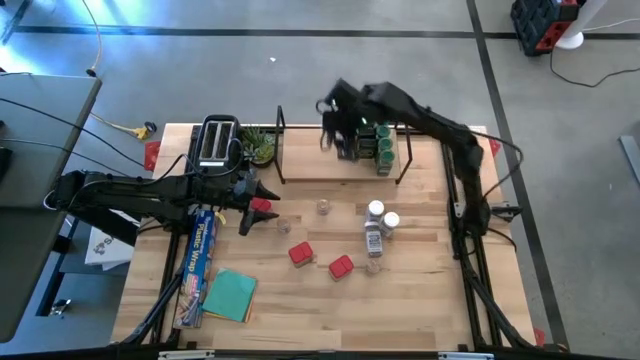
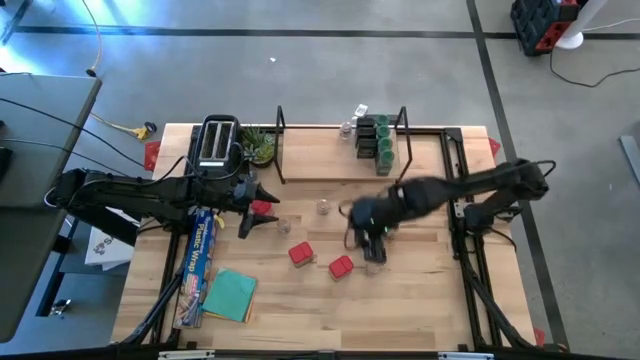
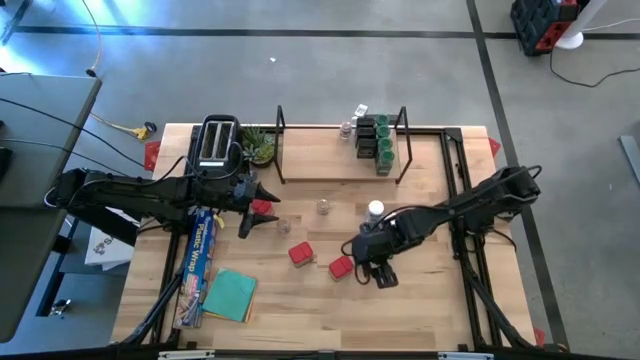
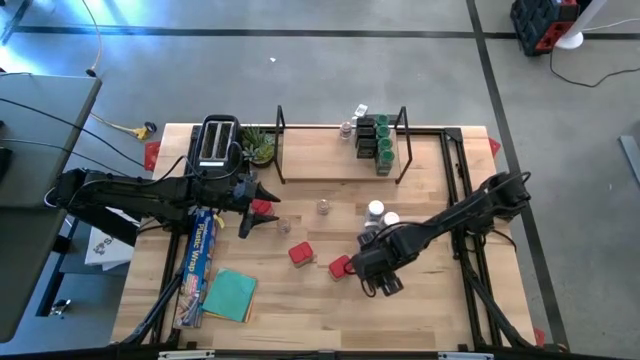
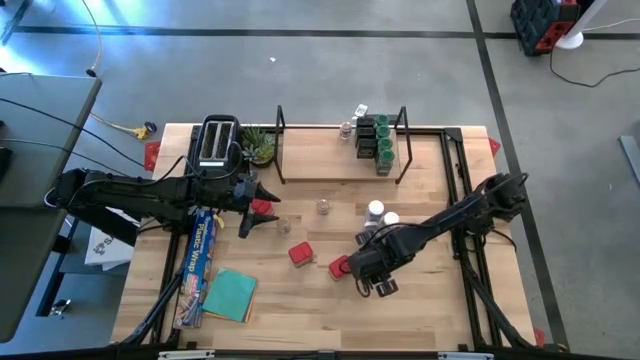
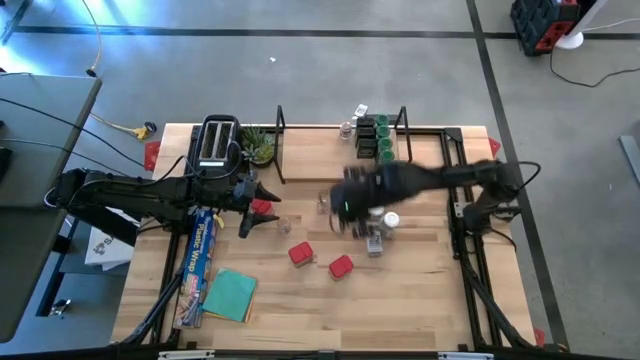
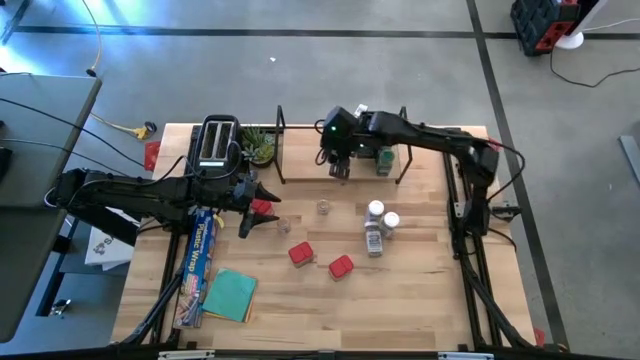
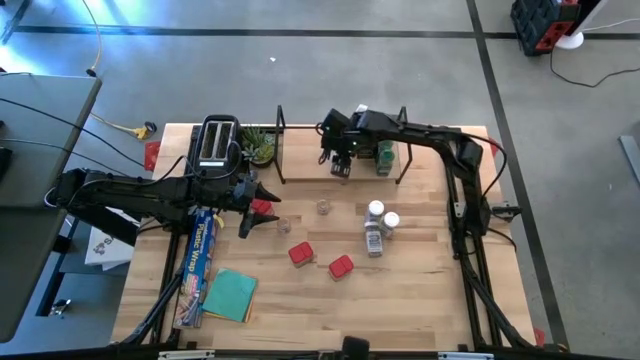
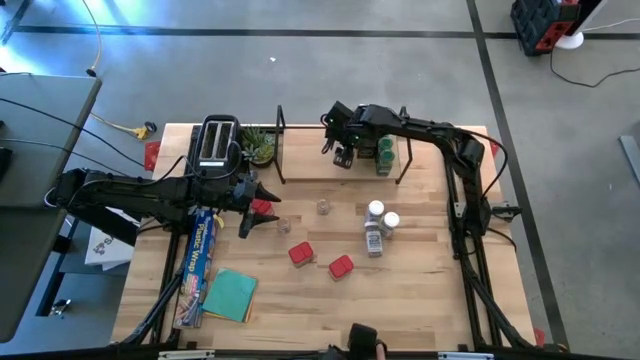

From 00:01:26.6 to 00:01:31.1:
Task: Shelf spices
Put the bottom right brown seasoning bottle on the shelf aligned with the other brown seasoning bottle

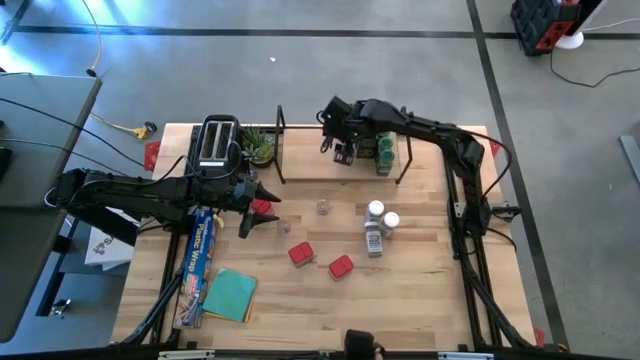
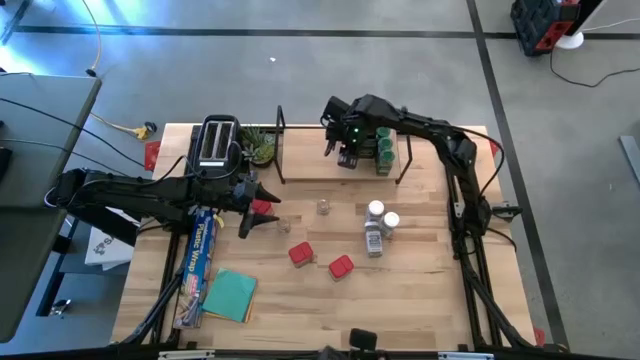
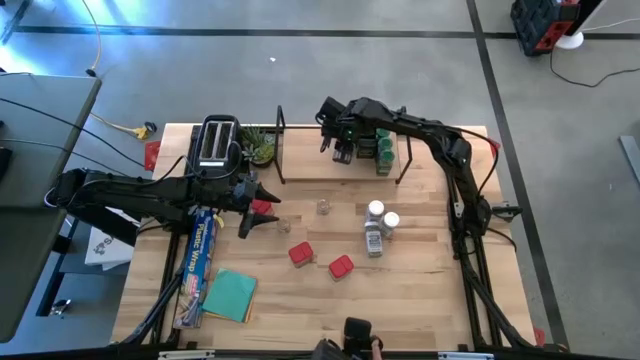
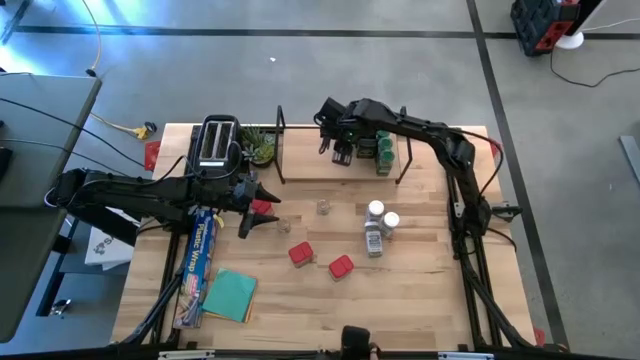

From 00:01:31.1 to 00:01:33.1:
Adjust the brown seasoning bottle

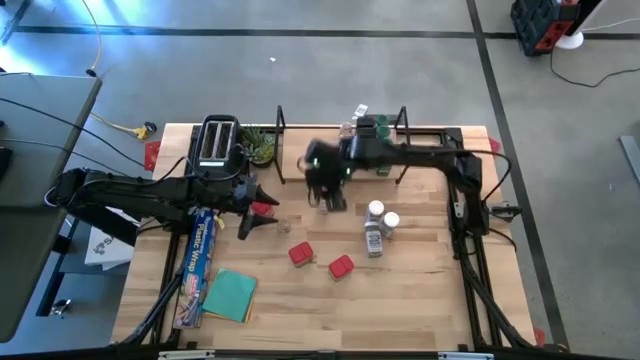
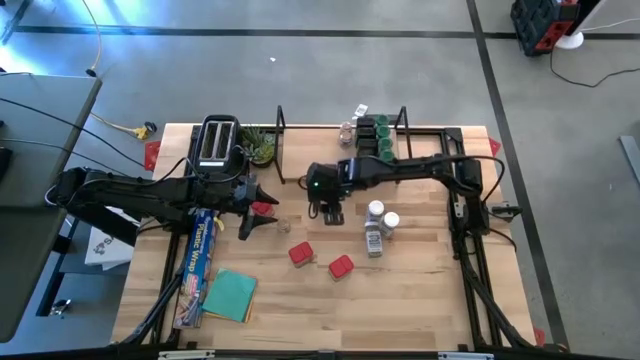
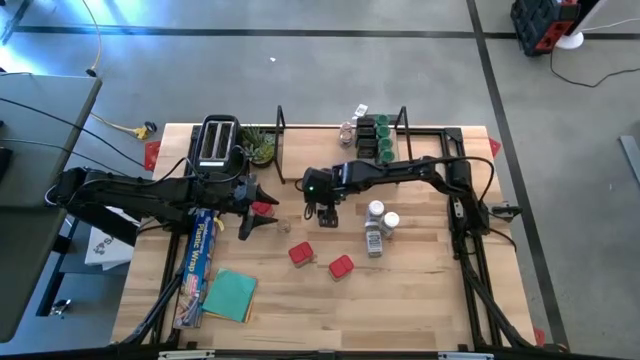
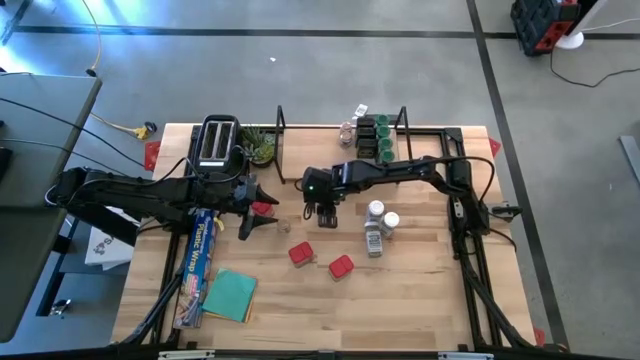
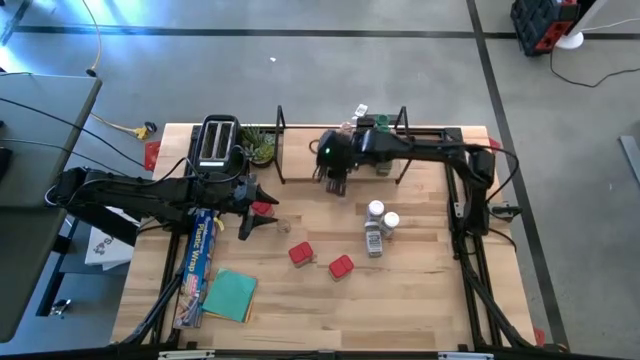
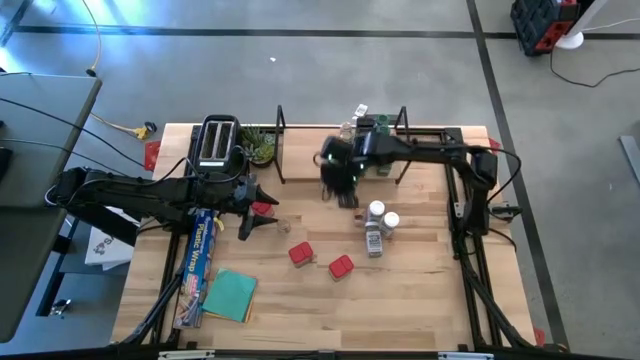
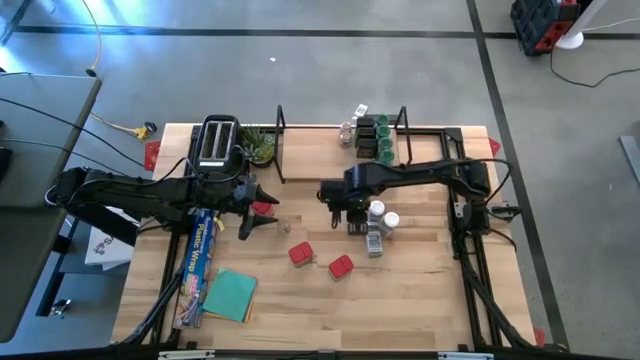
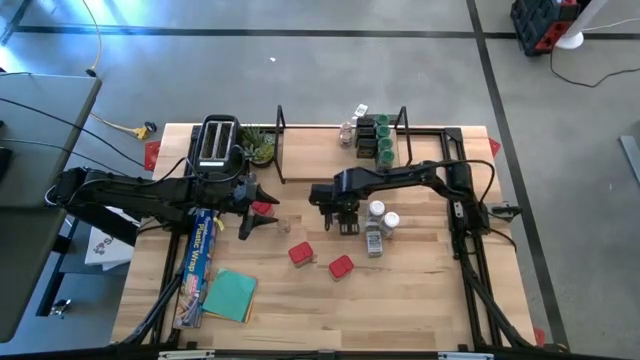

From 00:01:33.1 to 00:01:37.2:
Put the right brown seasoning bottle on the shelf aligned with the other brown seasoning bottles

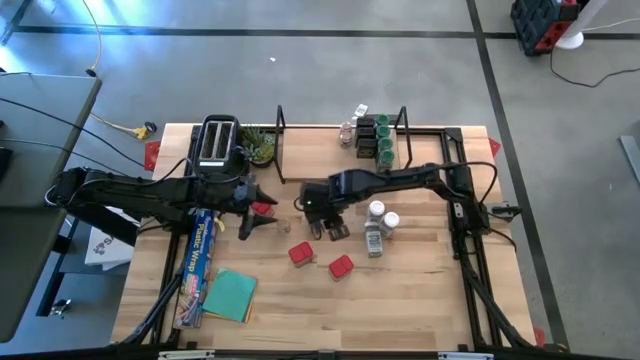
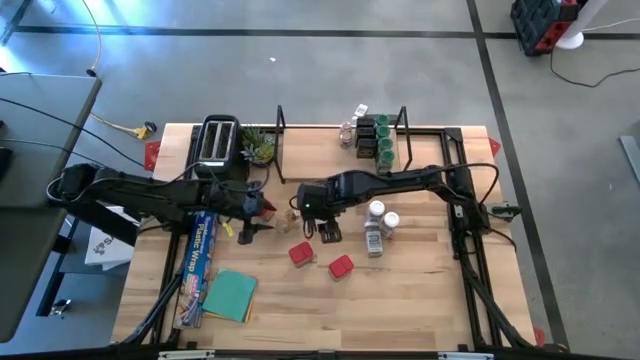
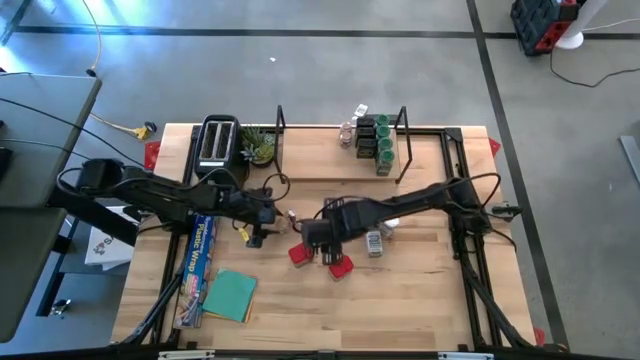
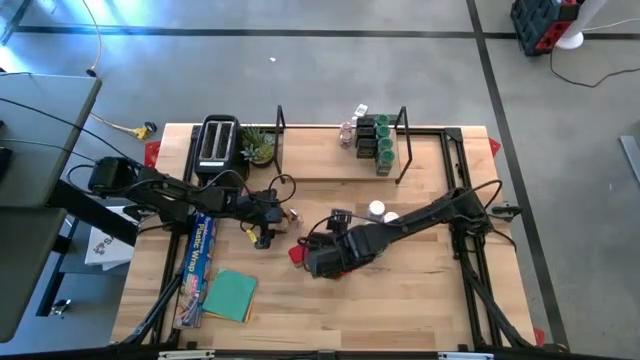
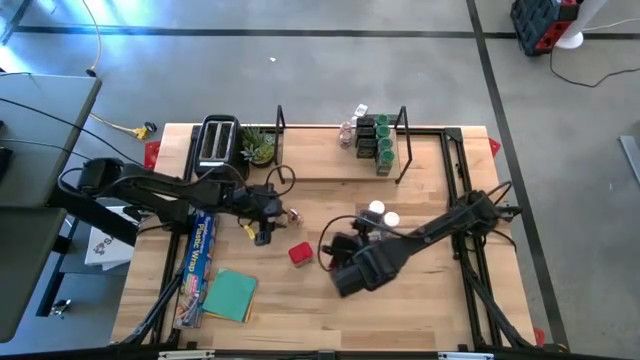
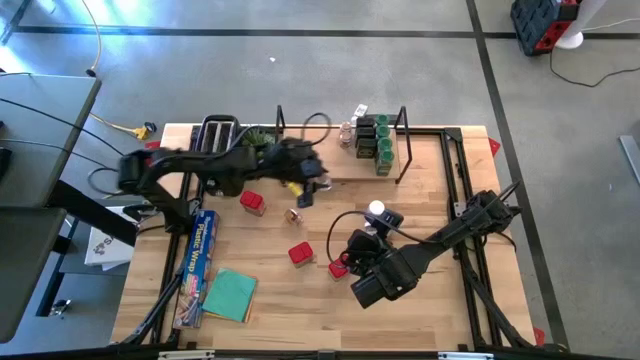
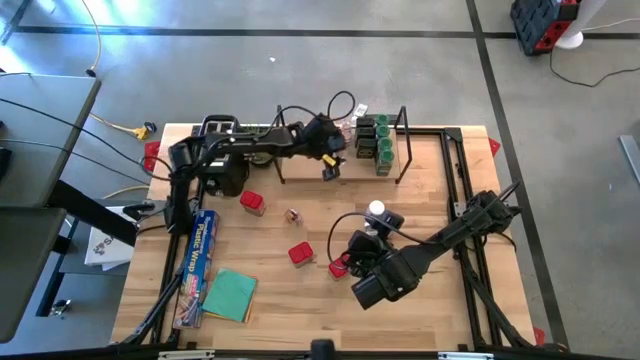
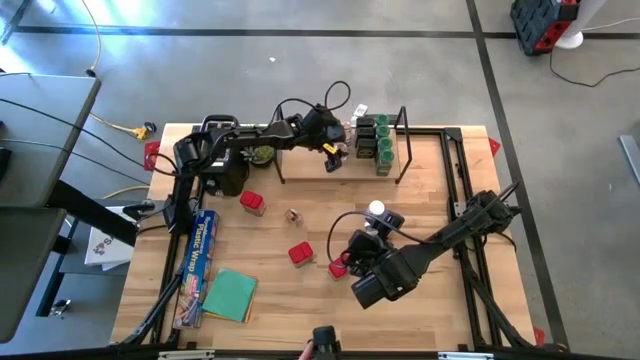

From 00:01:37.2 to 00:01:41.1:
Put the left brown seasoning bottle on the shelf aligned with the other brown seasoning bottles

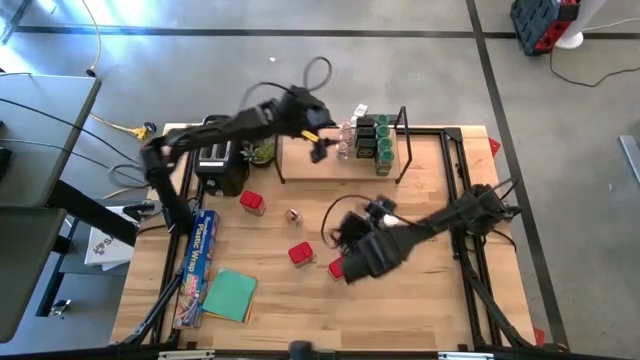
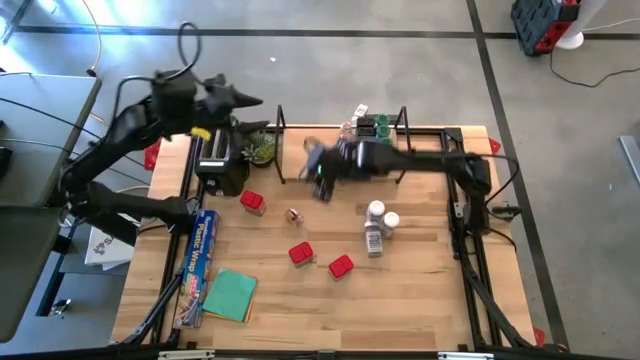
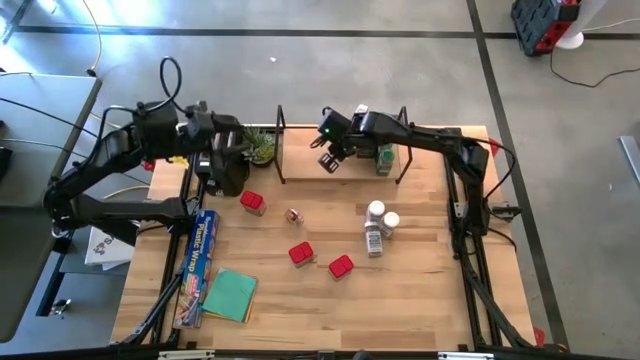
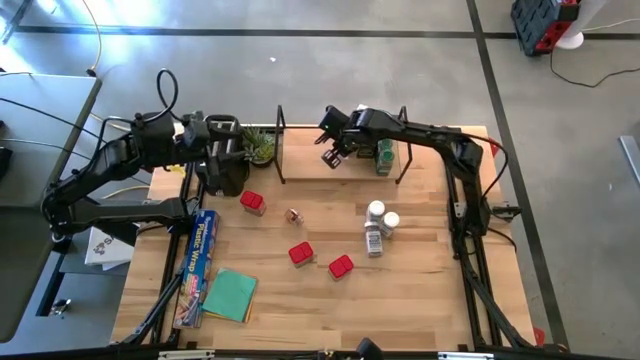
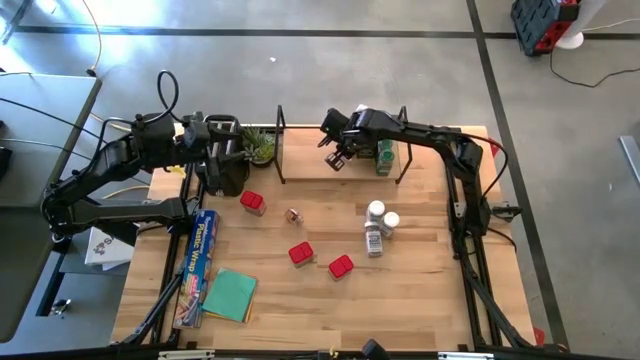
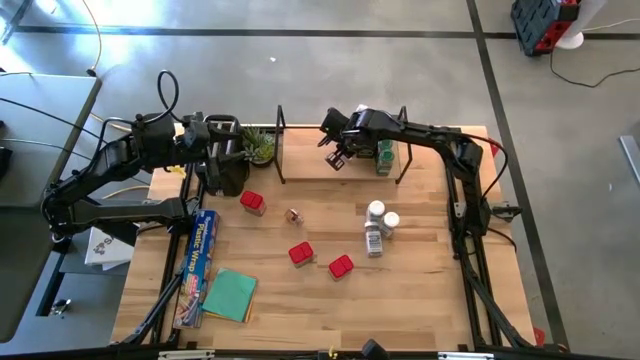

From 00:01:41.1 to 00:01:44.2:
Adjust the brown seasoning bottle

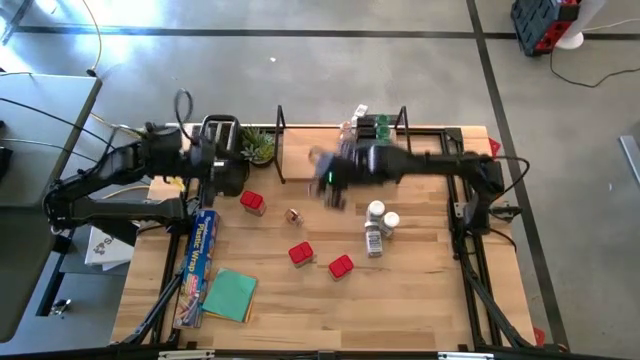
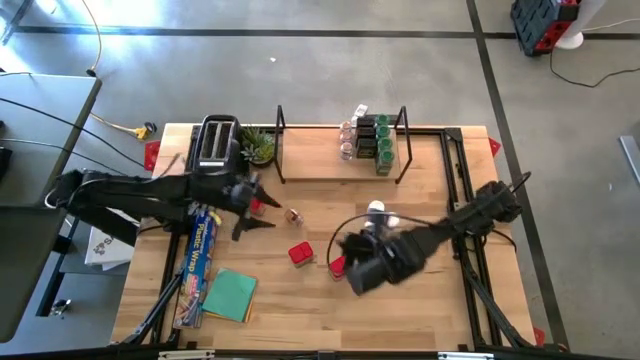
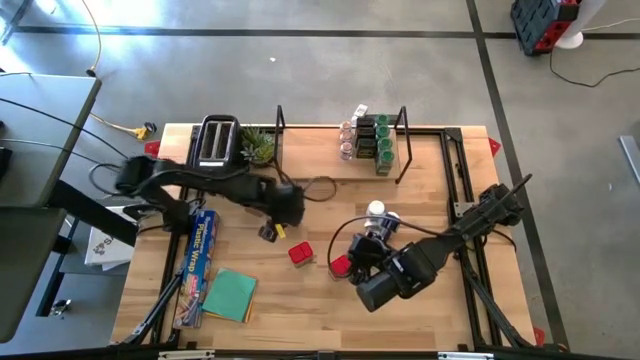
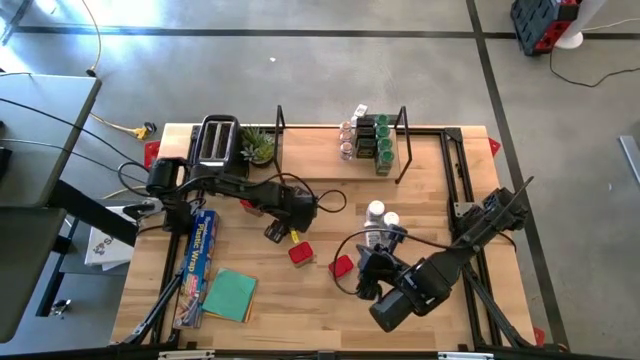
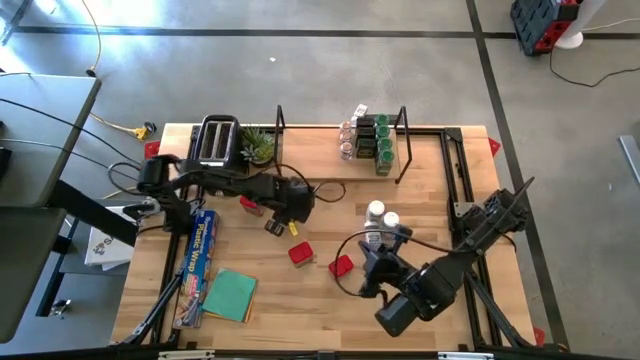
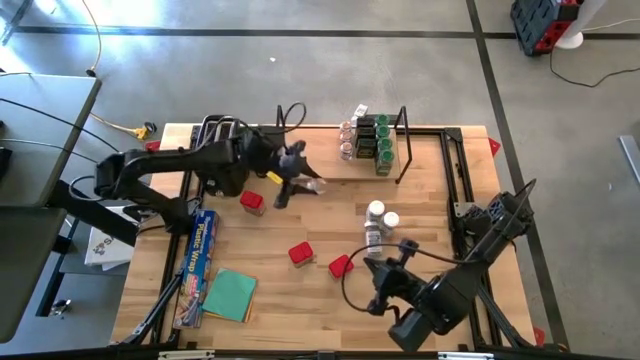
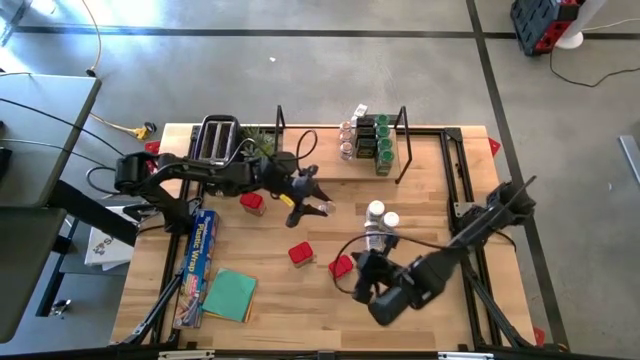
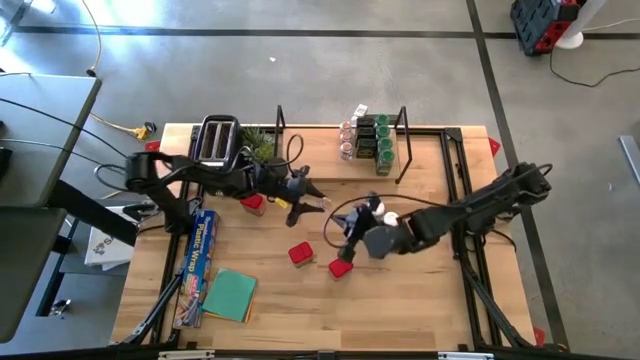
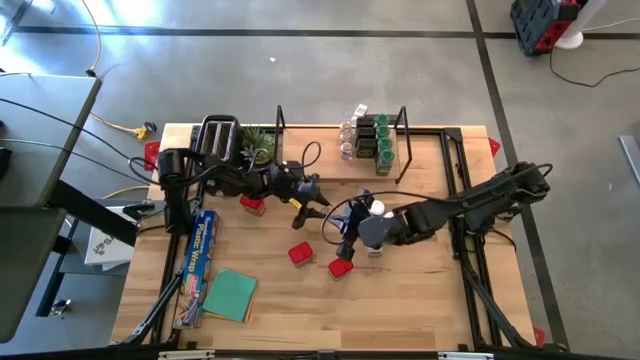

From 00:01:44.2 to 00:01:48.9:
Put the brown seasoning bottle on the table
